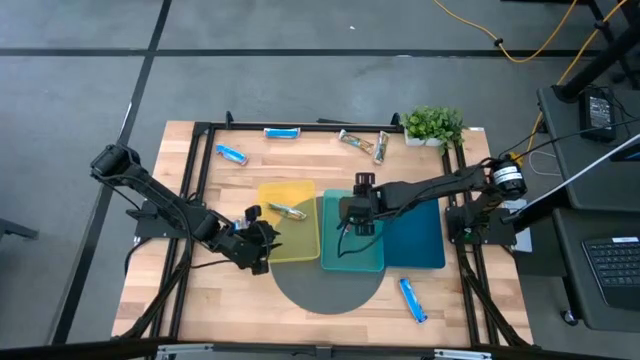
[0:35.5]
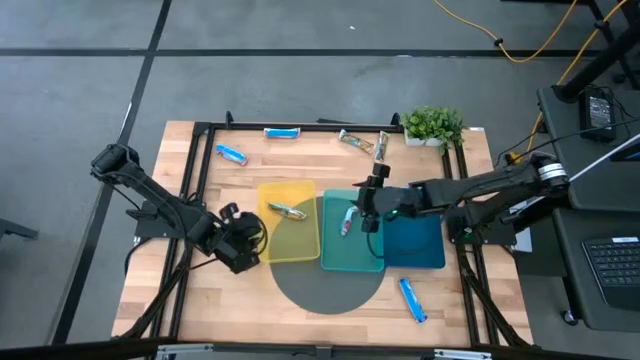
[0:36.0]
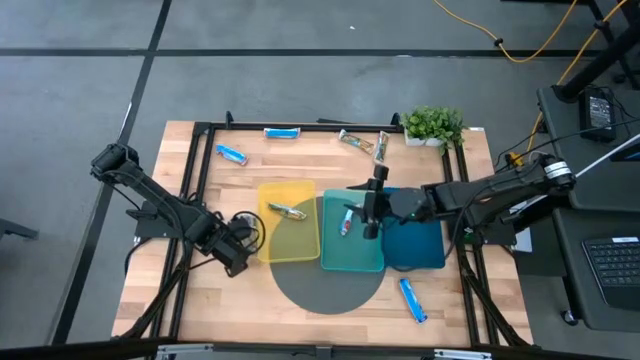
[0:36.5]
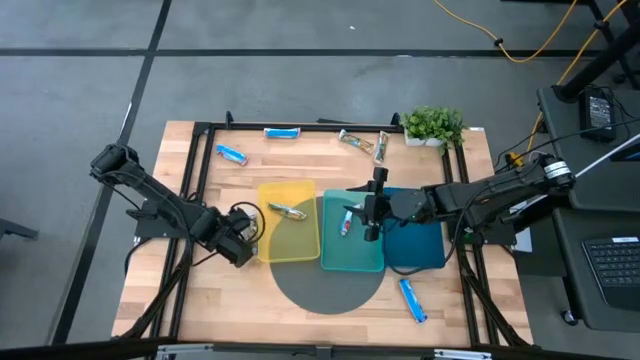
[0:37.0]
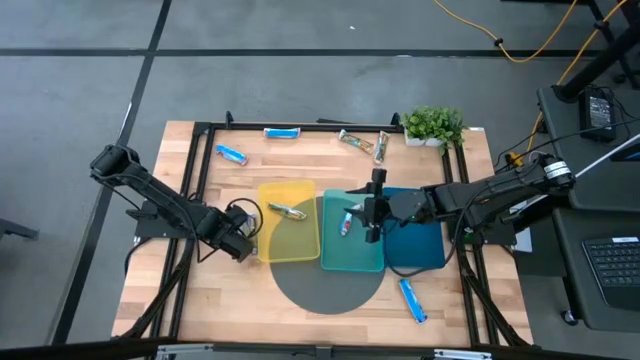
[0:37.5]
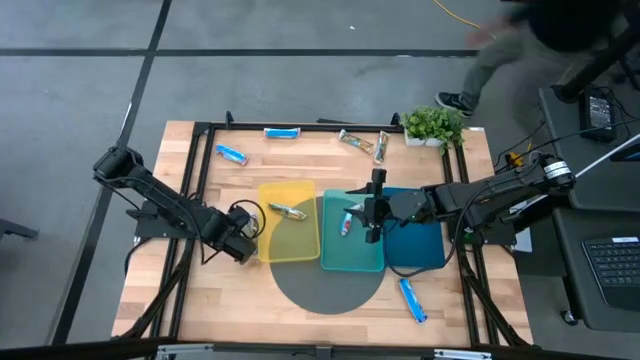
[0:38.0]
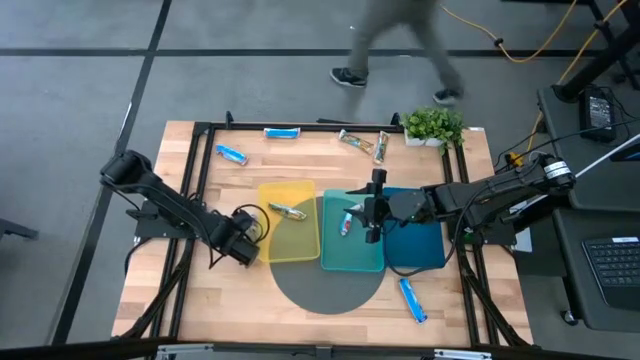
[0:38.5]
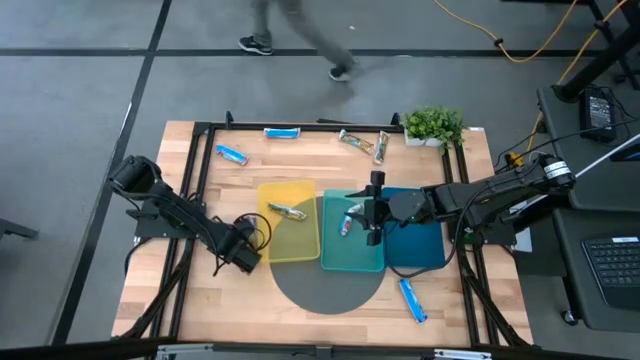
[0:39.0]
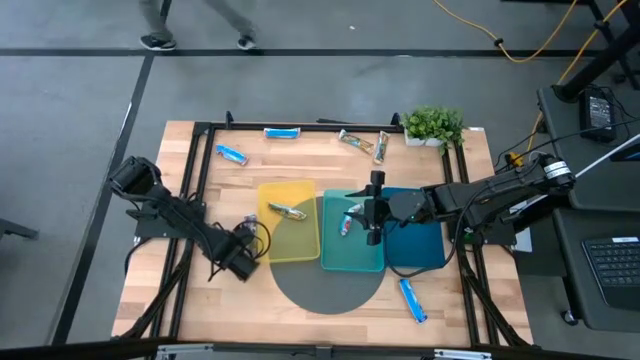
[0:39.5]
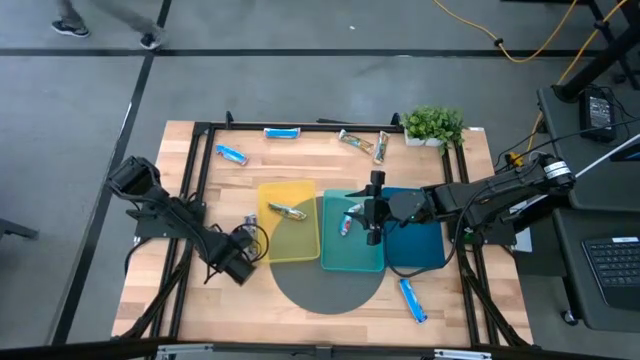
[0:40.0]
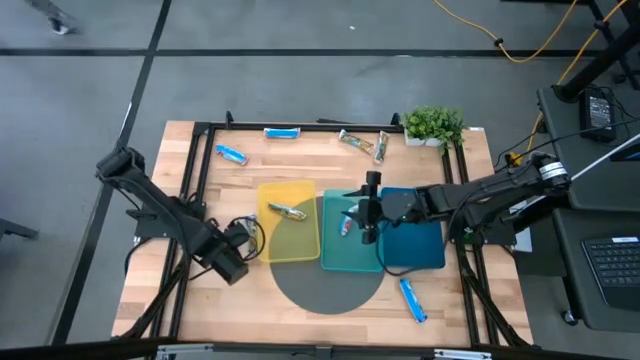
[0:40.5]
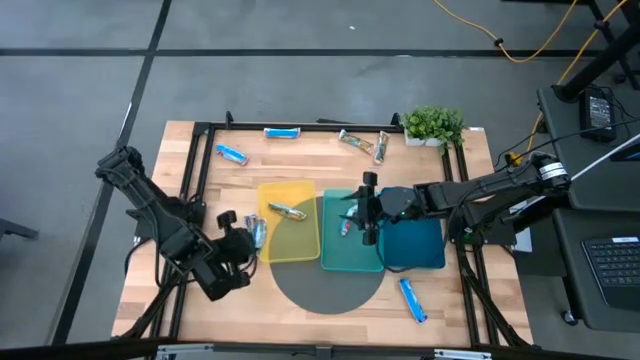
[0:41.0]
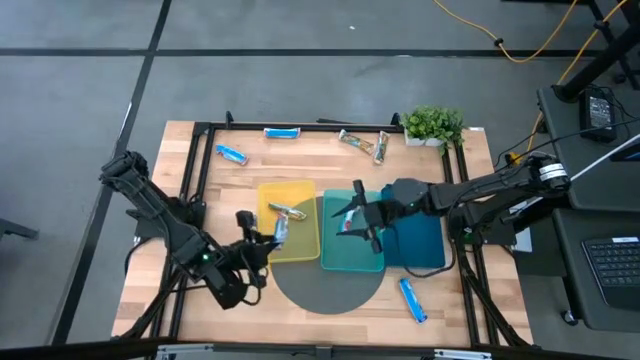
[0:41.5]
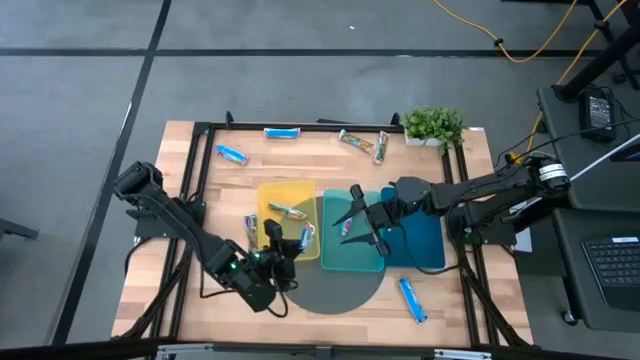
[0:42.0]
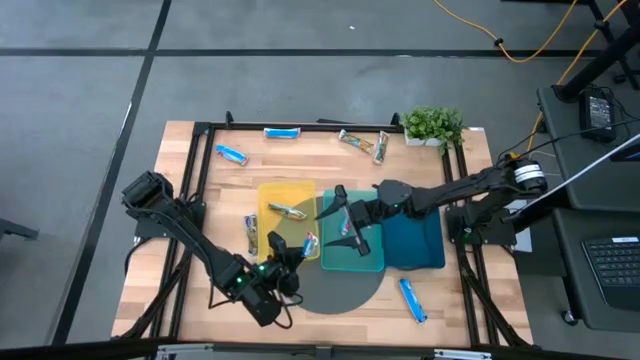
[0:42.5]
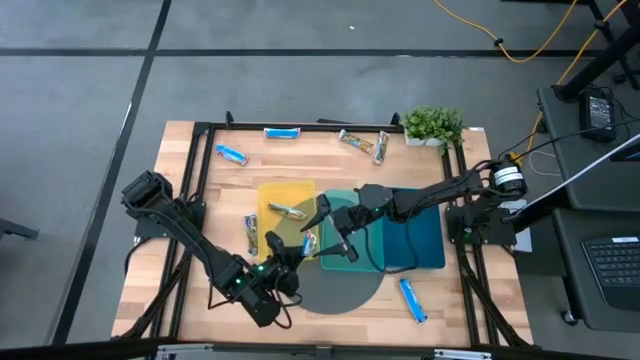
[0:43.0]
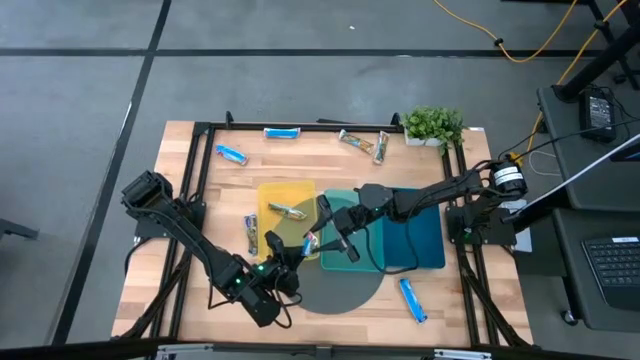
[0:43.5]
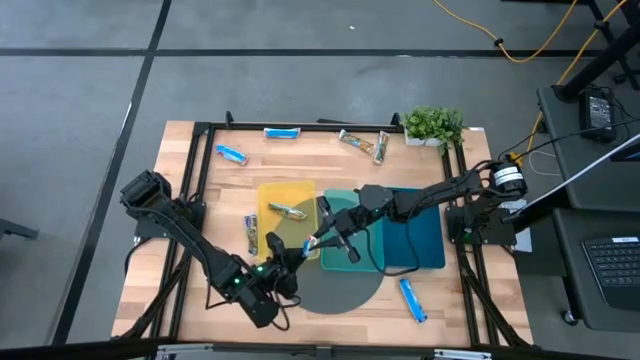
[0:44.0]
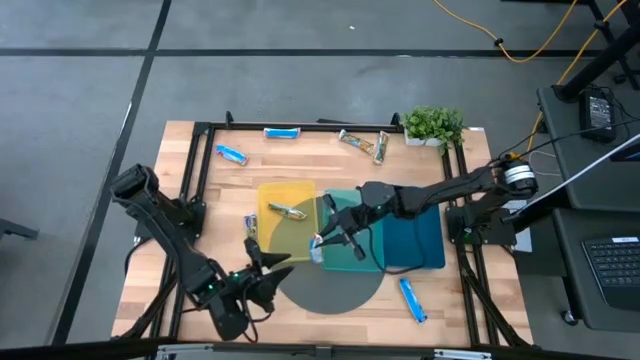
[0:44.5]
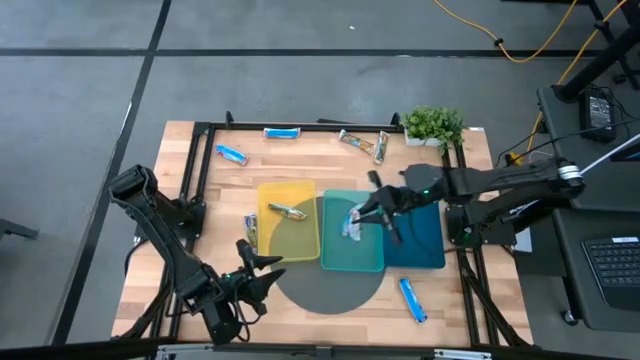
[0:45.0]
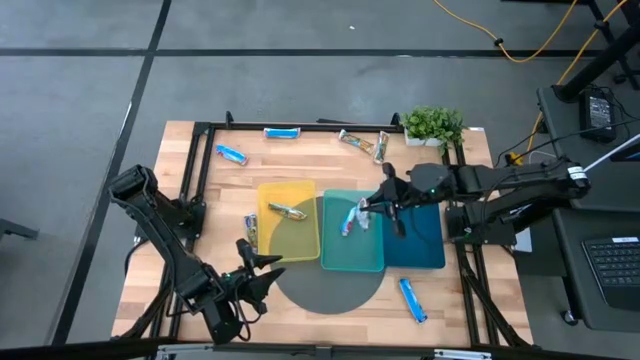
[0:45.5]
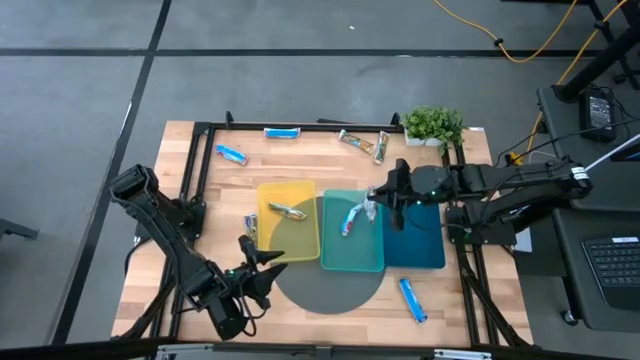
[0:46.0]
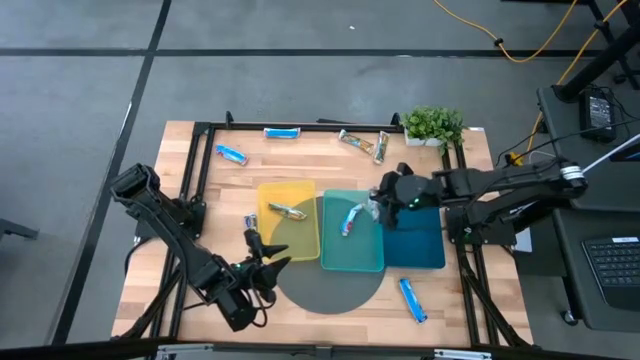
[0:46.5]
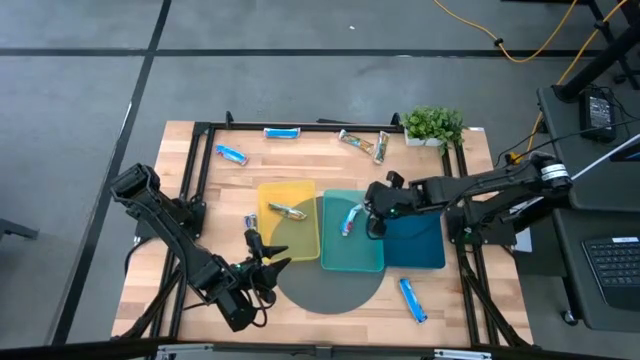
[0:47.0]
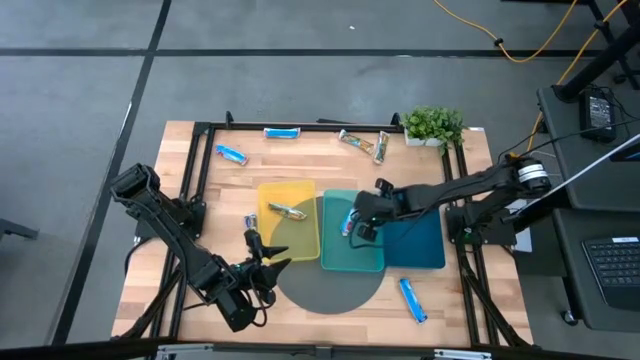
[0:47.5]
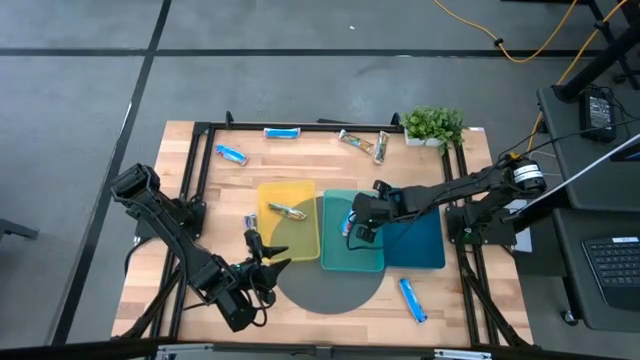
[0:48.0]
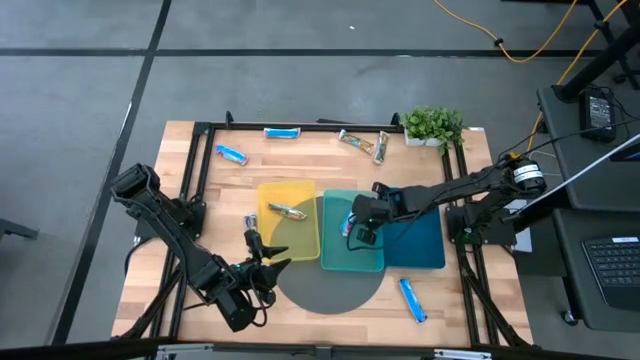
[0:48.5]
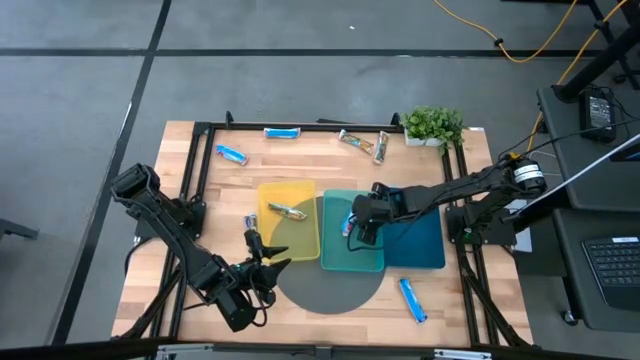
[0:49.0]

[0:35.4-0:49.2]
Task: Pick and place Granola Bars by type
Put the red granola bar into the green bin

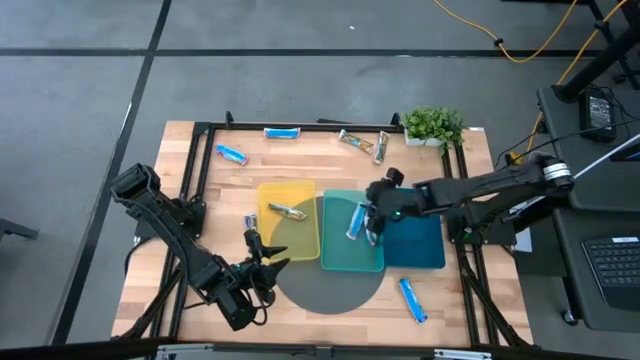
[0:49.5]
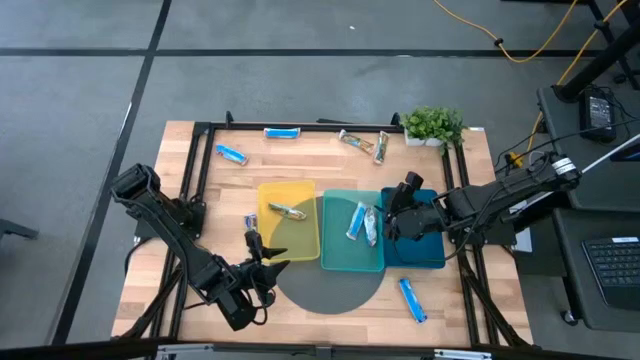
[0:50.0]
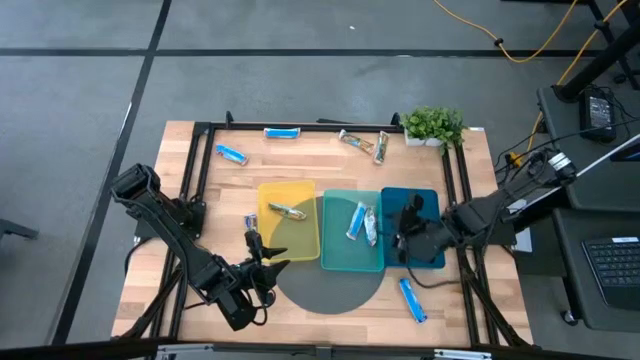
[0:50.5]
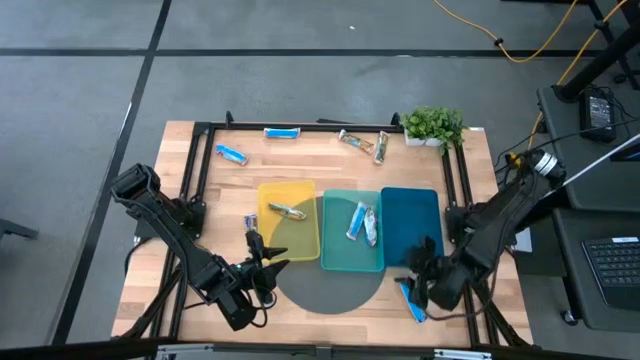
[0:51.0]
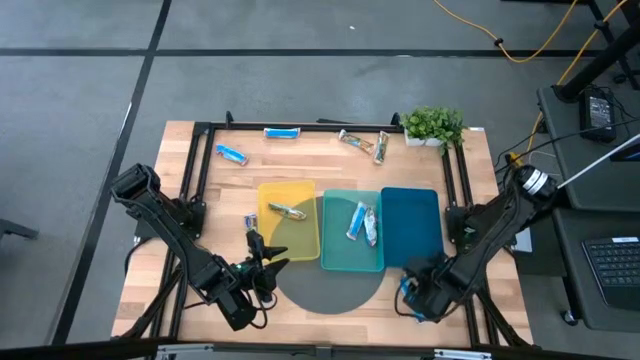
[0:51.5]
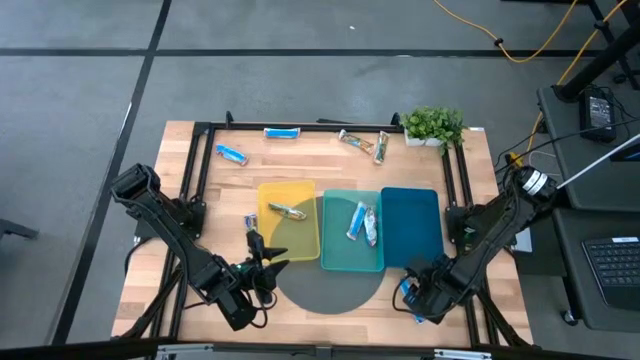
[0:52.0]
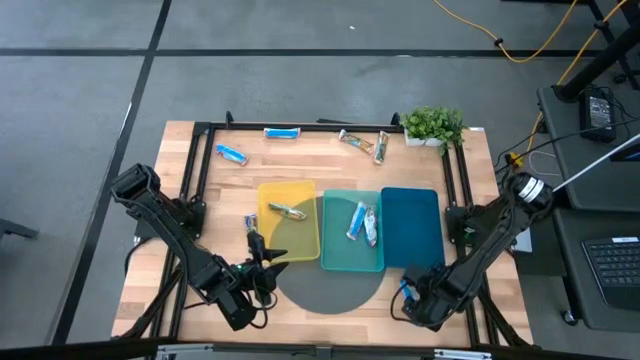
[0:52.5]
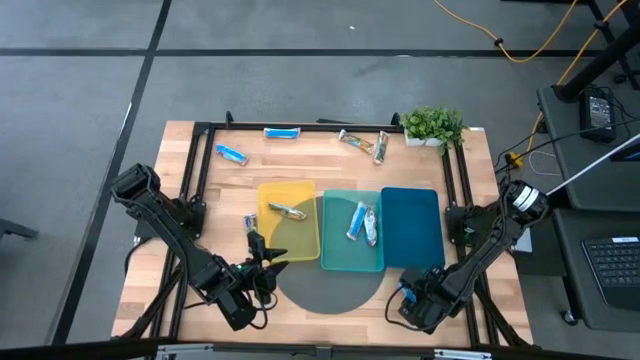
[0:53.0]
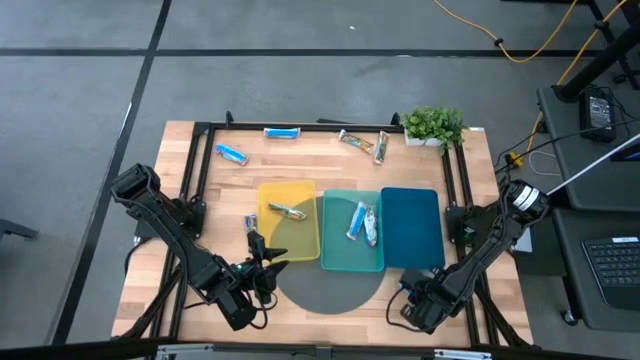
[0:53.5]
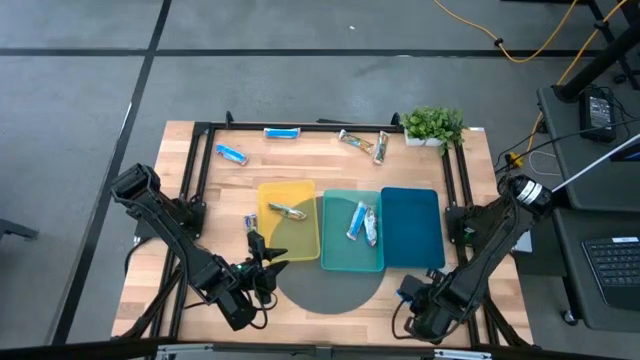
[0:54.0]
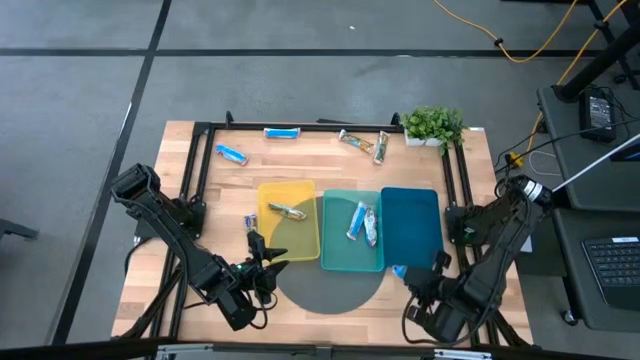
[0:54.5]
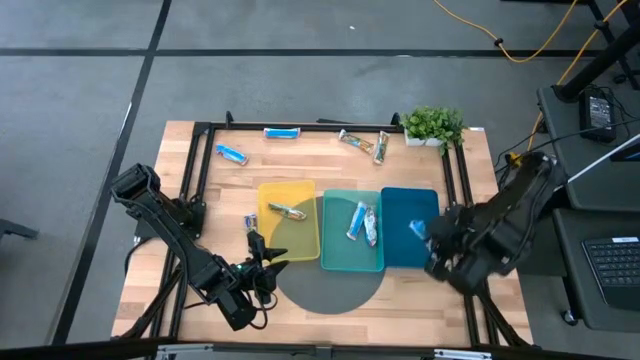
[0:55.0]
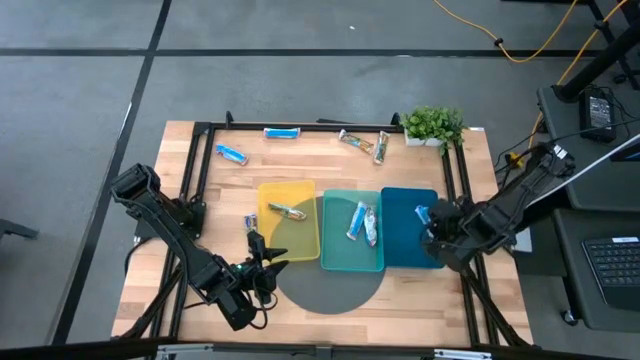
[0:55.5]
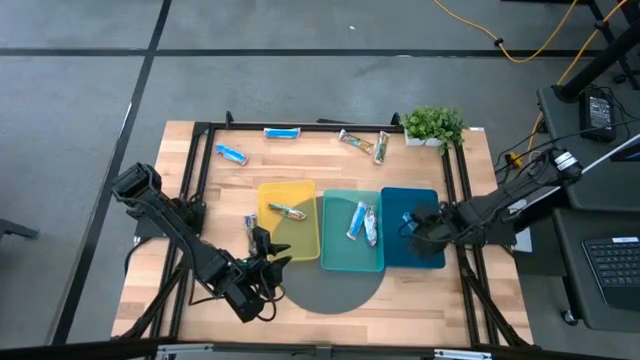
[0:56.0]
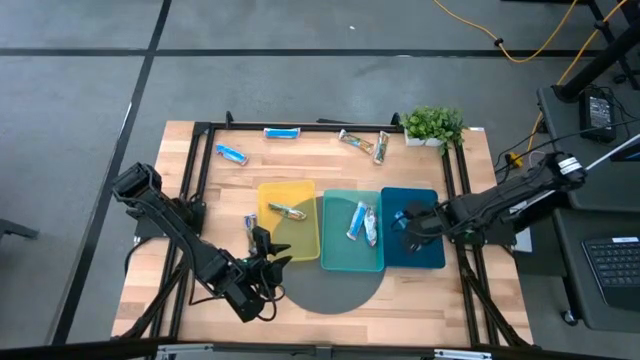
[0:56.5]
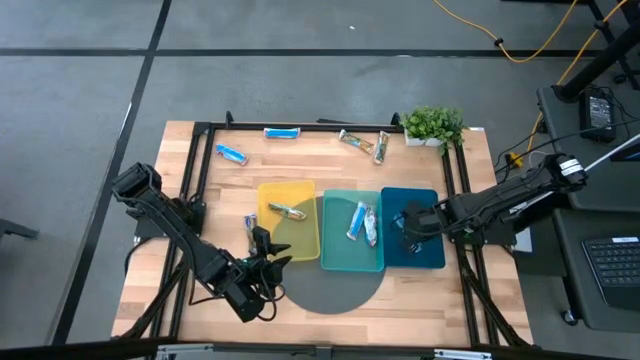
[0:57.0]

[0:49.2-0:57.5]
Put the blue granola bar into the blue bin
